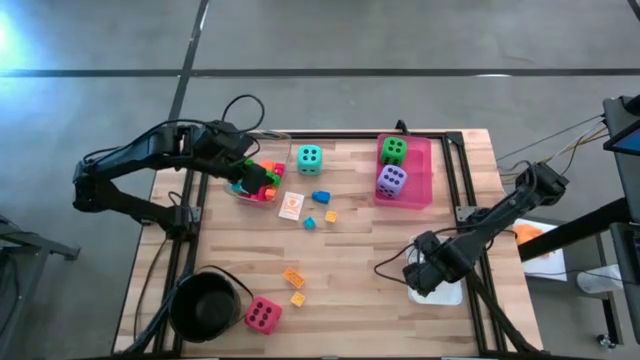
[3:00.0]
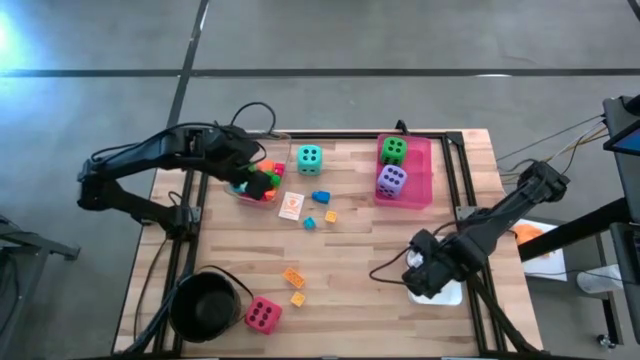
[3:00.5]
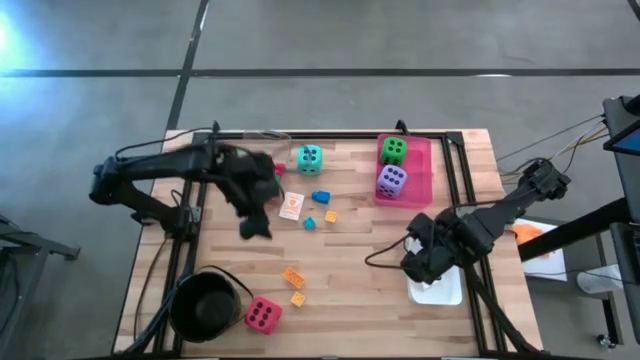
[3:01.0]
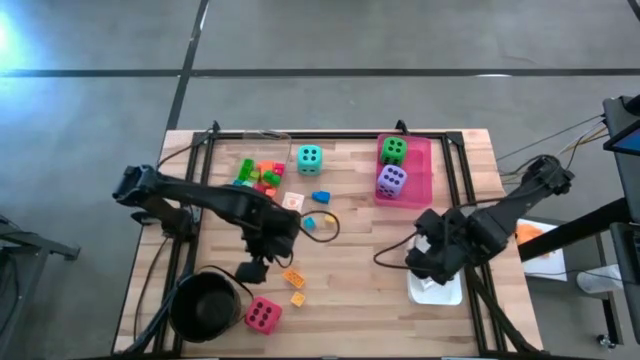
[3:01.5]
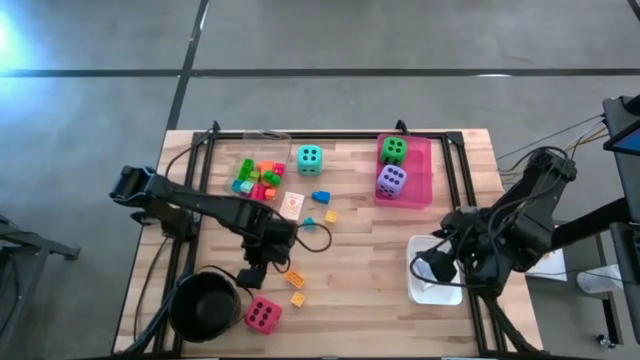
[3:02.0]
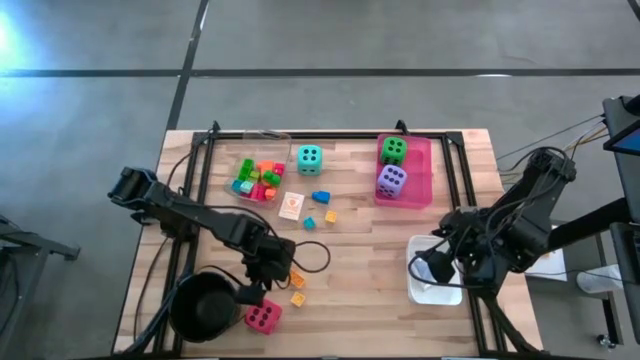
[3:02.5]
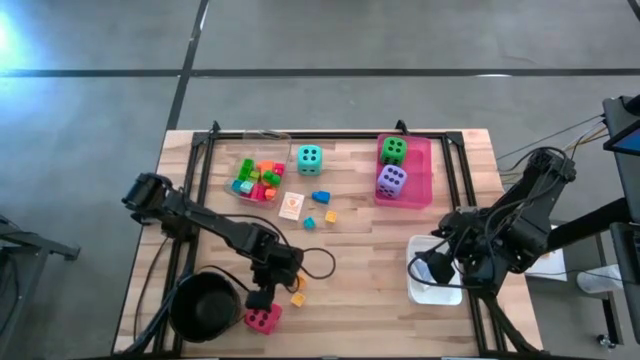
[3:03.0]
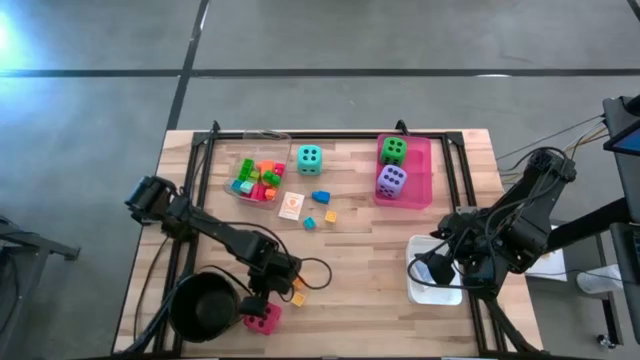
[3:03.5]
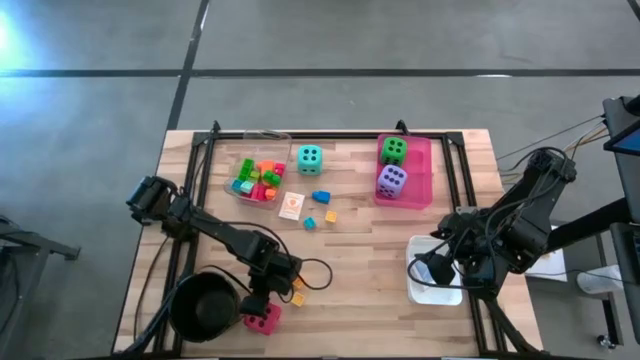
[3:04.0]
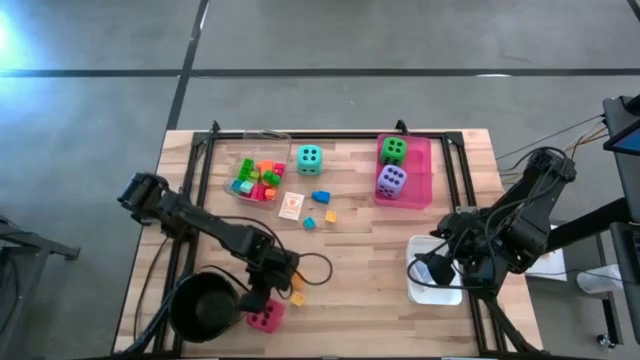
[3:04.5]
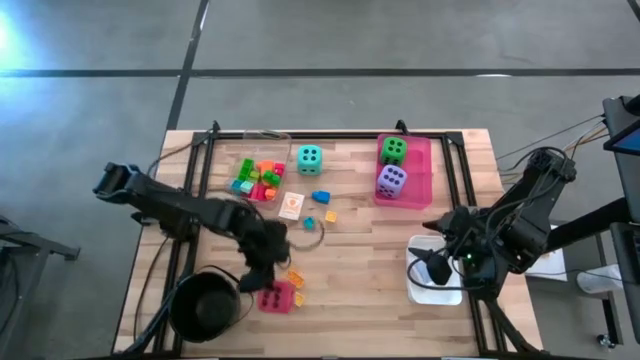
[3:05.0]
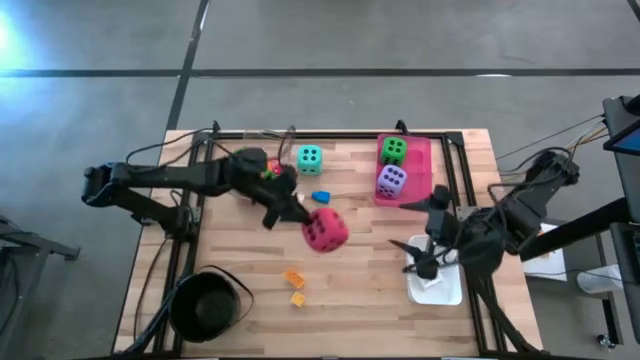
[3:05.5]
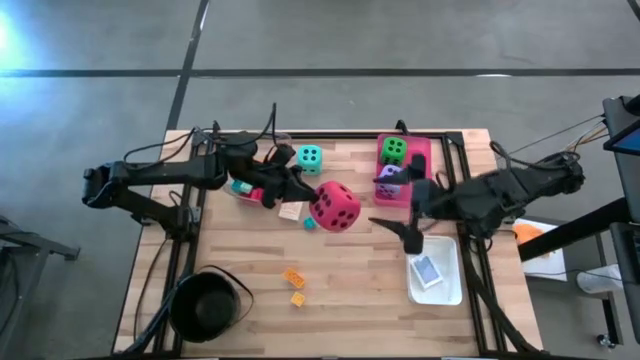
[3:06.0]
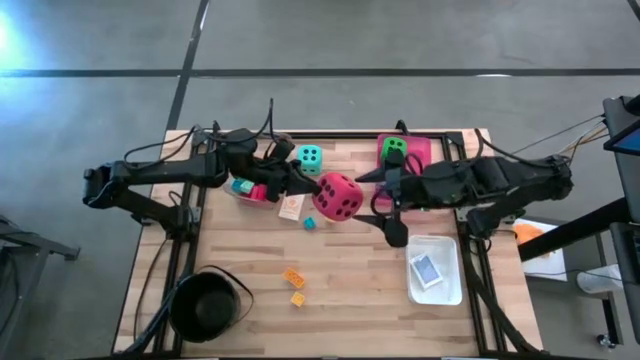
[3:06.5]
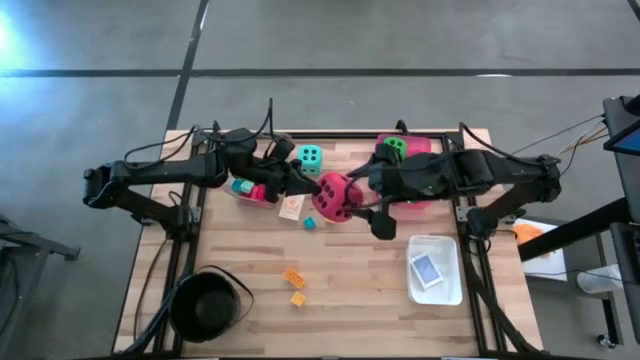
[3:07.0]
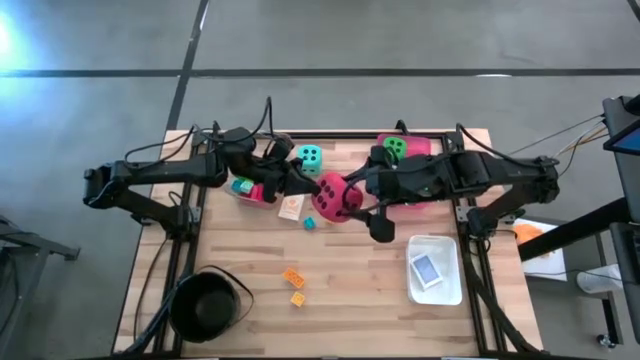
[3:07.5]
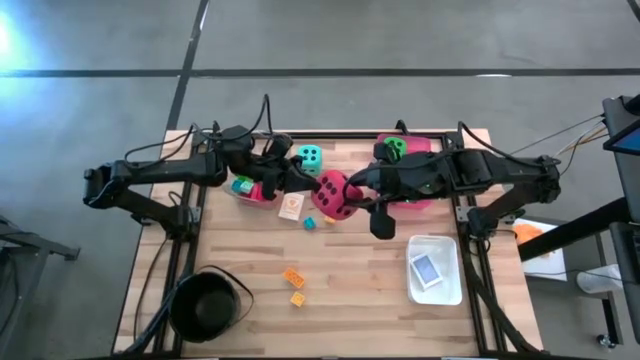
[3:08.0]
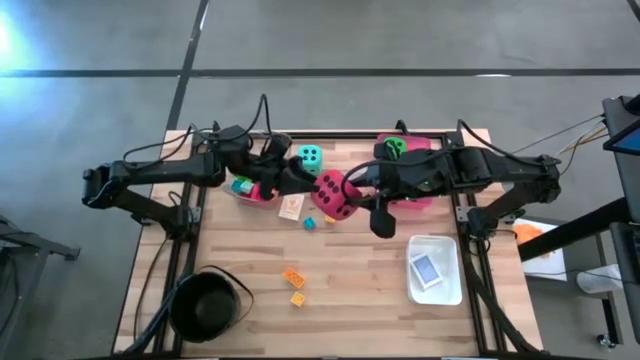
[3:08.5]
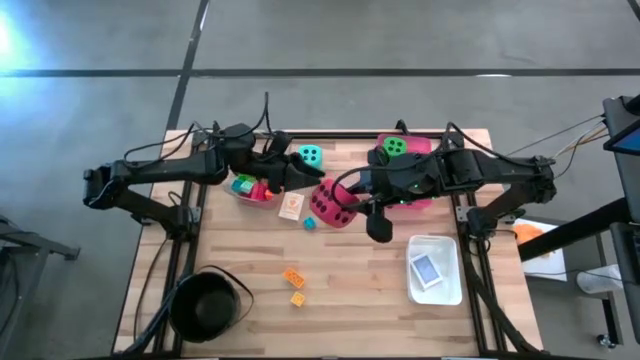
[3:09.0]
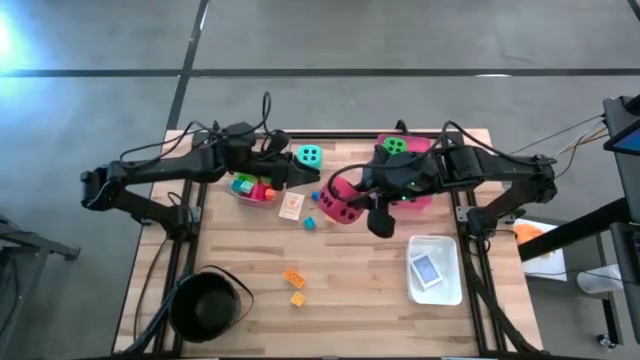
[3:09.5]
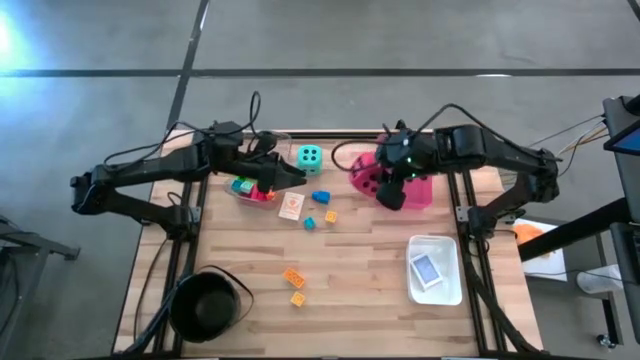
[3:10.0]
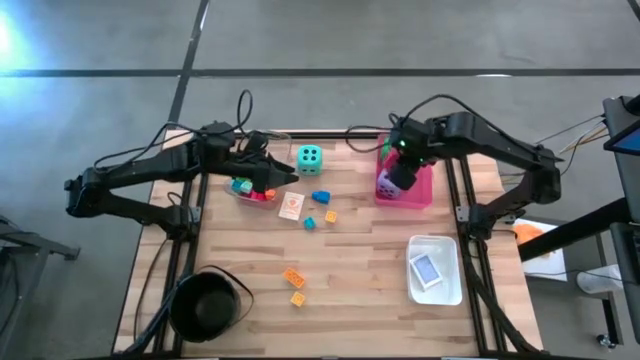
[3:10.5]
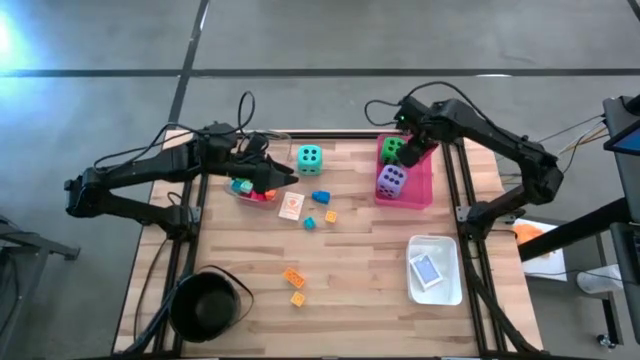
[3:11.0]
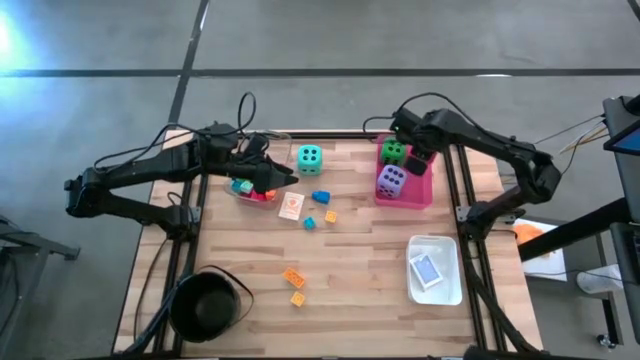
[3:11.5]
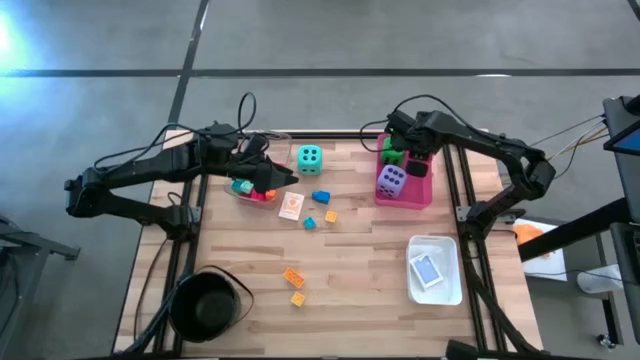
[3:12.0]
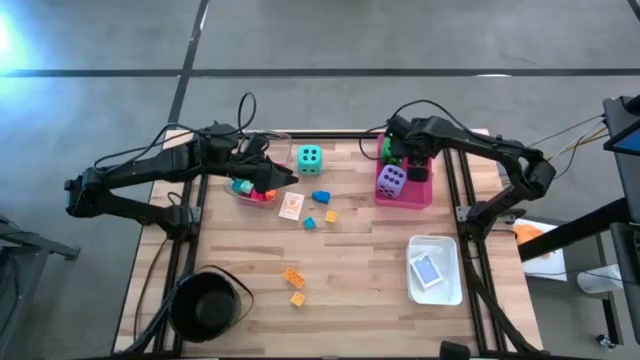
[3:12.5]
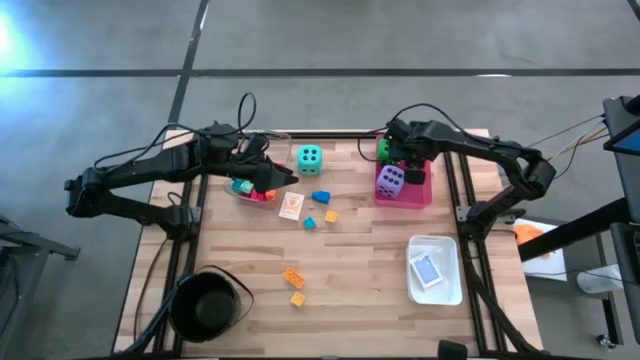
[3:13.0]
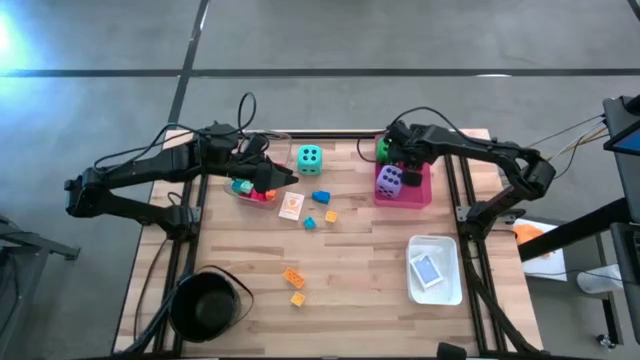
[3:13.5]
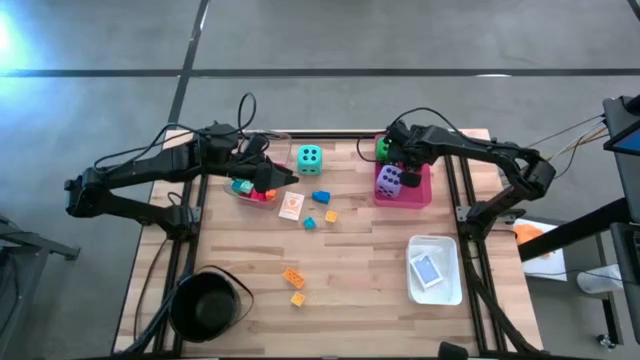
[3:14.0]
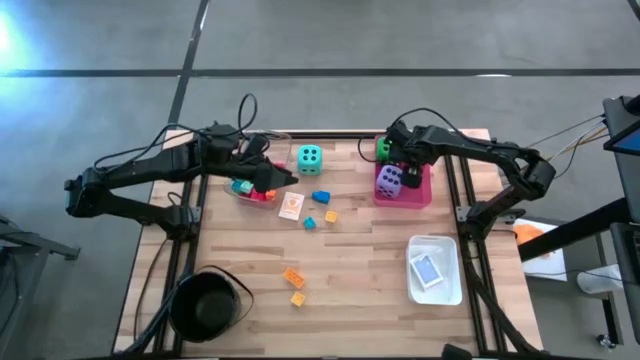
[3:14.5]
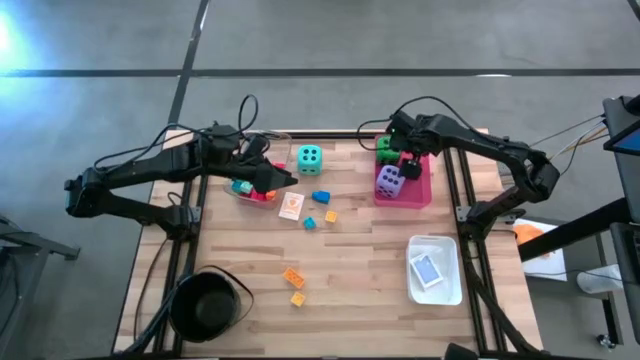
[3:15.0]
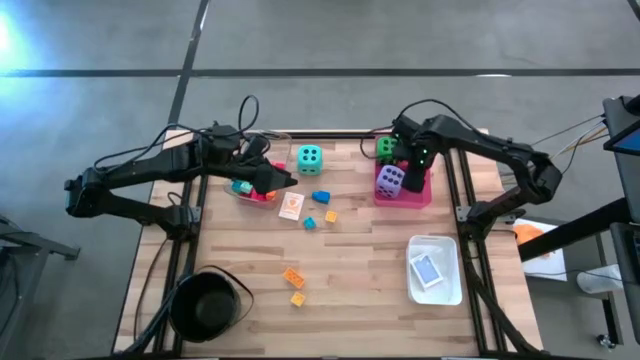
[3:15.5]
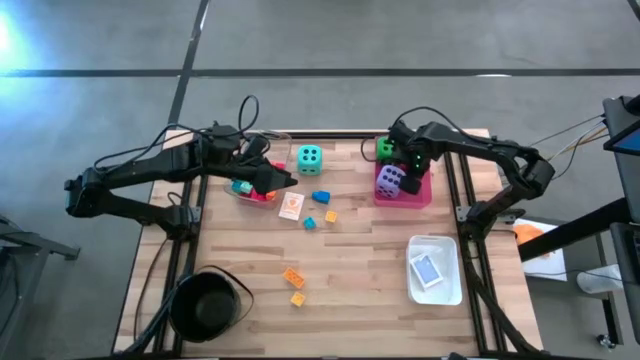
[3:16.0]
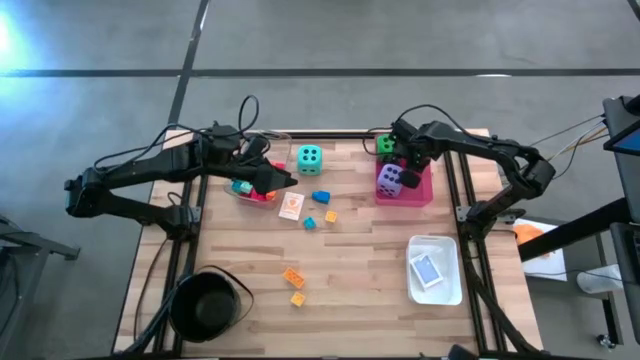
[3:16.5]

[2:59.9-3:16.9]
Task: Pick & Place Toys
Put the red die into the pink bin

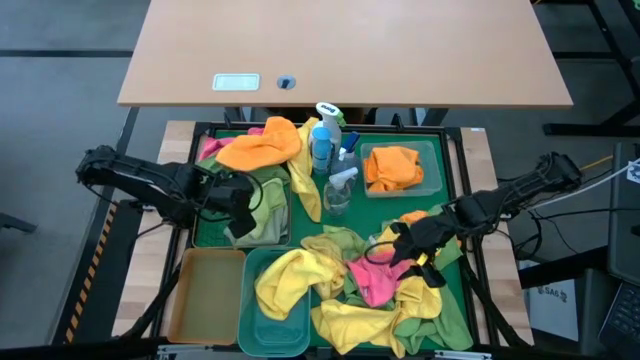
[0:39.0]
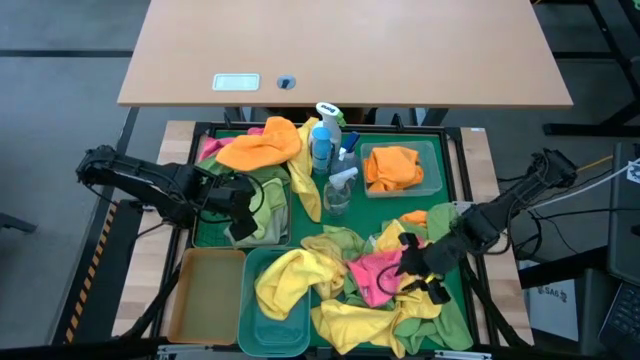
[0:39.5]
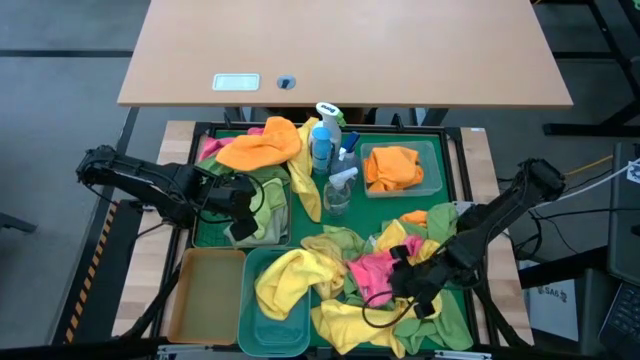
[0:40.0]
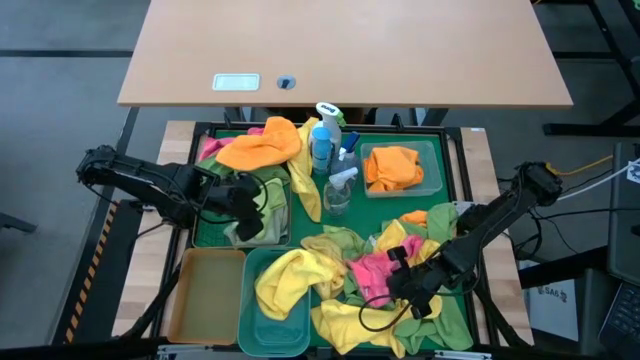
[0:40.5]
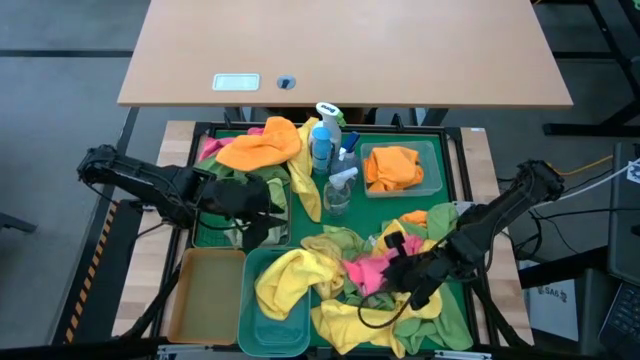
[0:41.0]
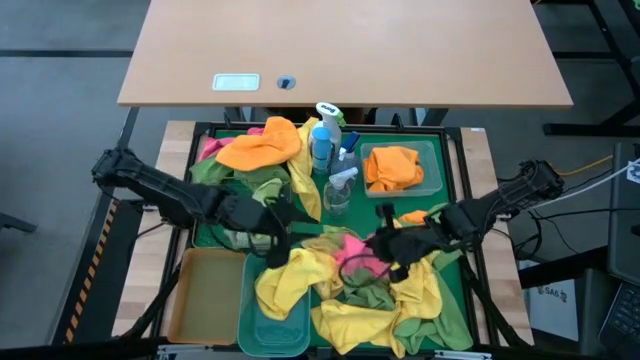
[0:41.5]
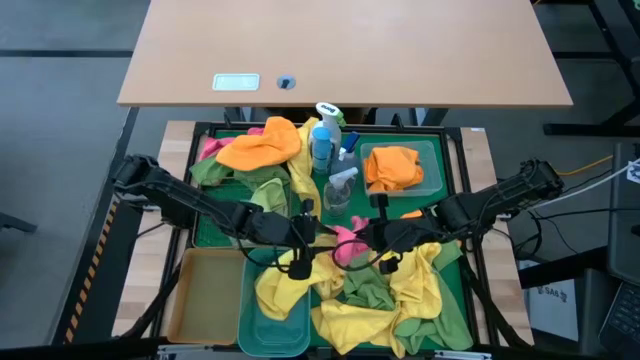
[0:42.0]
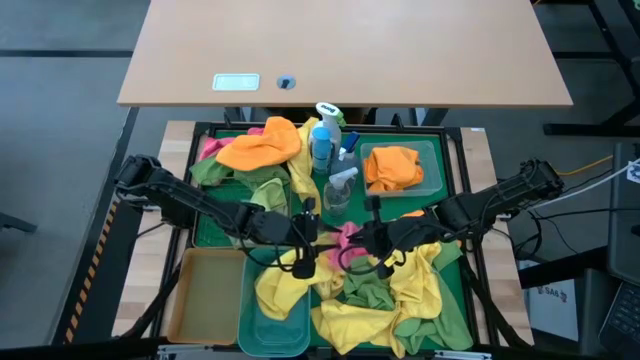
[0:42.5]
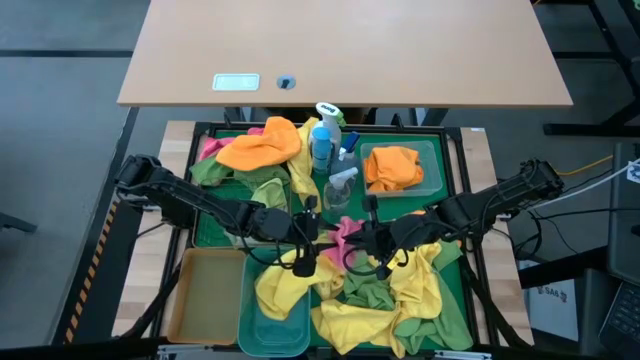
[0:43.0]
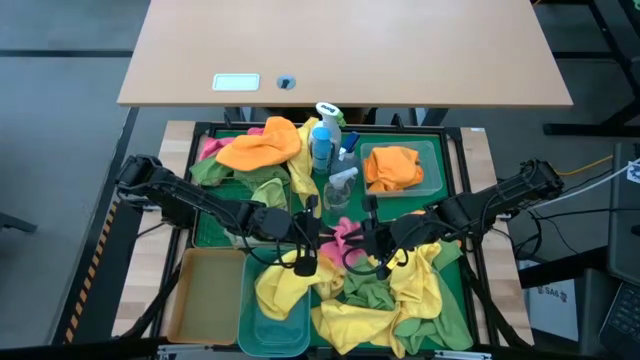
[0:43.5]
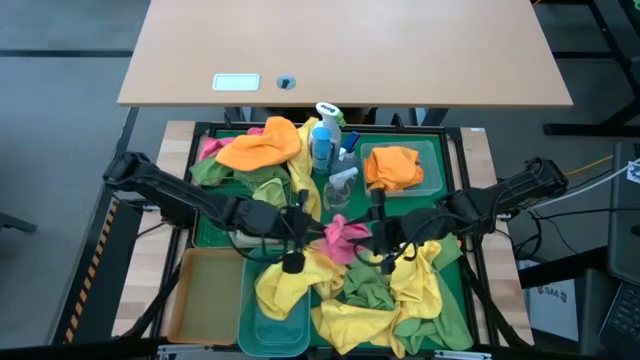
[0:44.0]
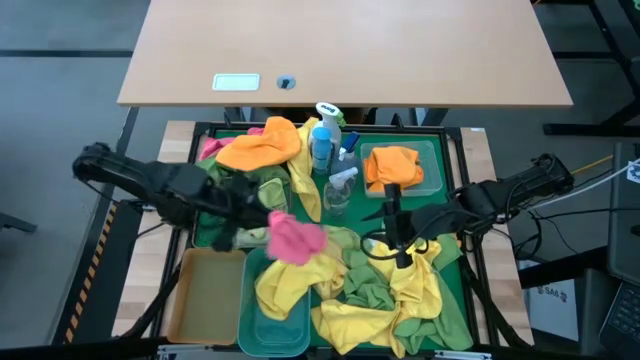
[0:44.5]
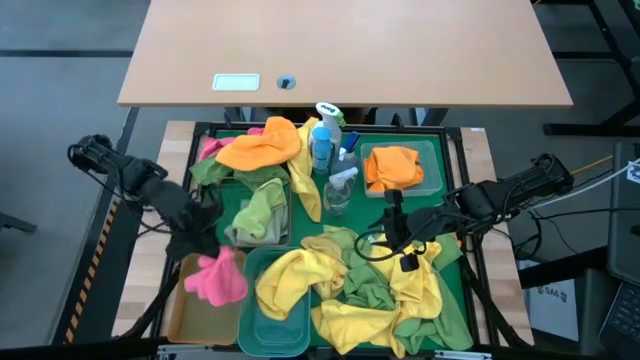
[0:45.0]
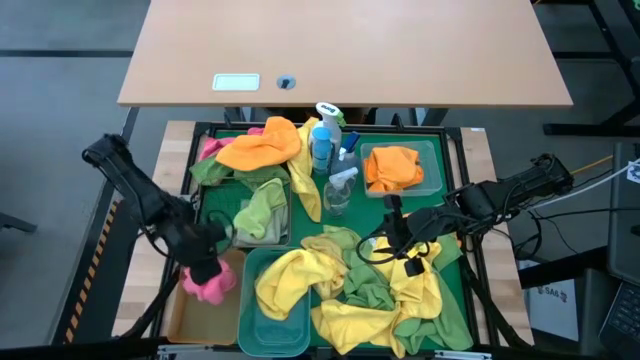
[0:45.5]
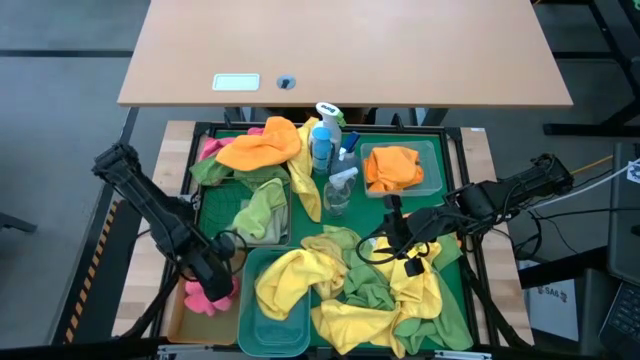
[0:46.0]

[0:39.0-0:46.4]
Task: Sort microfiber towel by color & place in baskets
Put the pink towel into the orange bin
